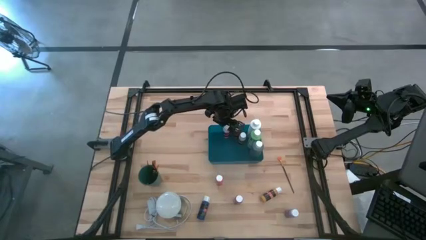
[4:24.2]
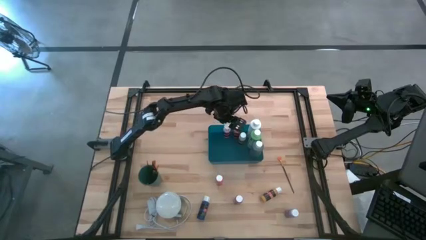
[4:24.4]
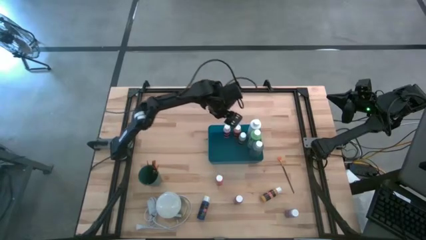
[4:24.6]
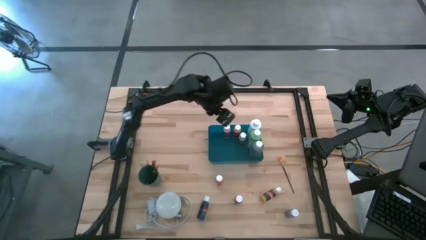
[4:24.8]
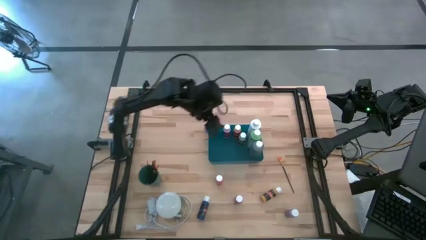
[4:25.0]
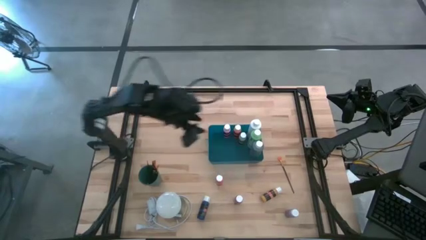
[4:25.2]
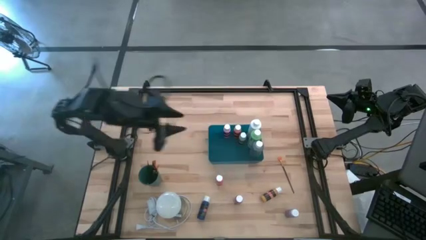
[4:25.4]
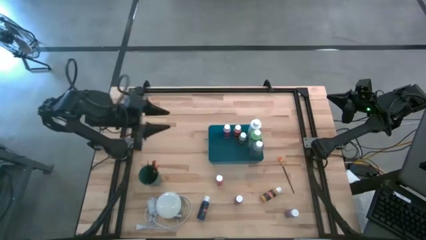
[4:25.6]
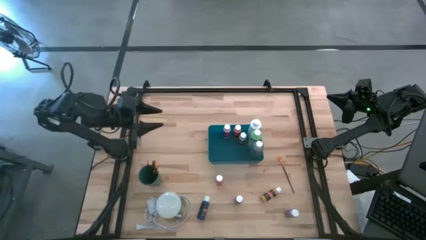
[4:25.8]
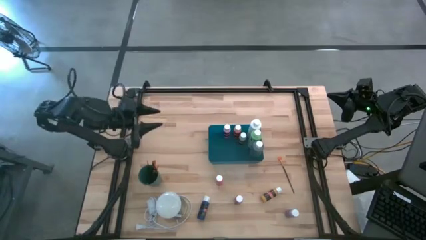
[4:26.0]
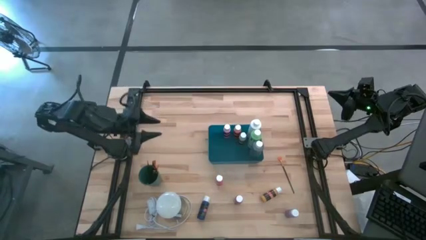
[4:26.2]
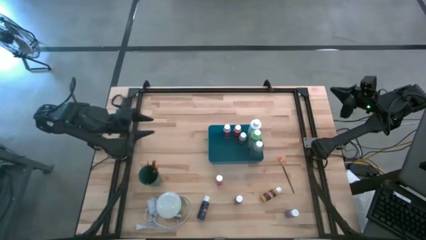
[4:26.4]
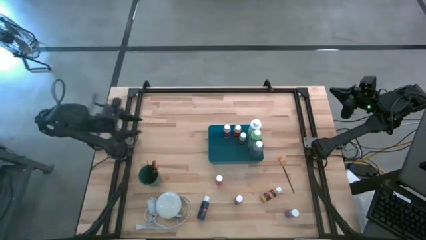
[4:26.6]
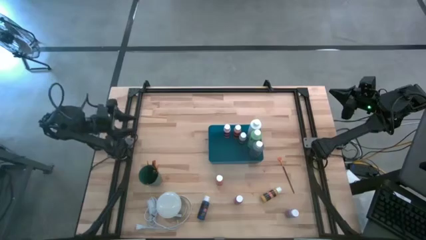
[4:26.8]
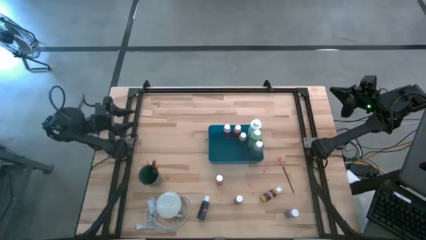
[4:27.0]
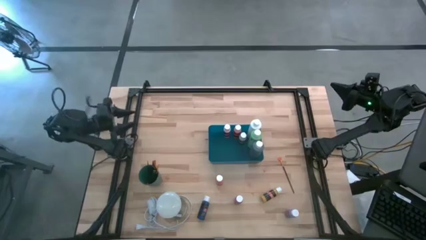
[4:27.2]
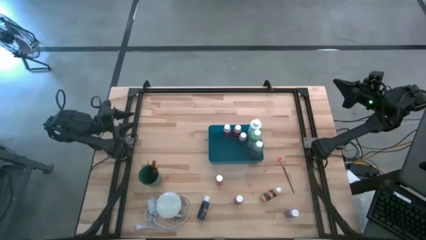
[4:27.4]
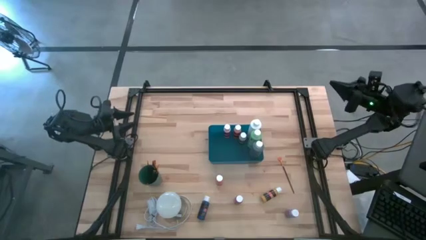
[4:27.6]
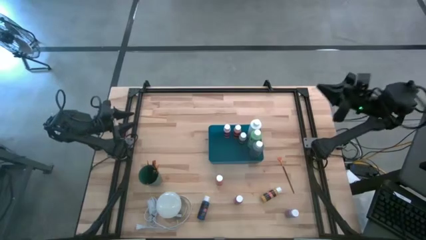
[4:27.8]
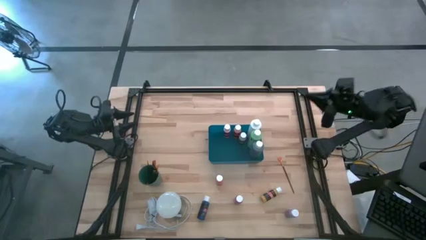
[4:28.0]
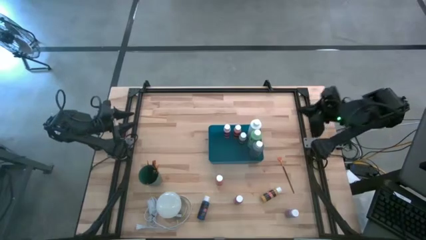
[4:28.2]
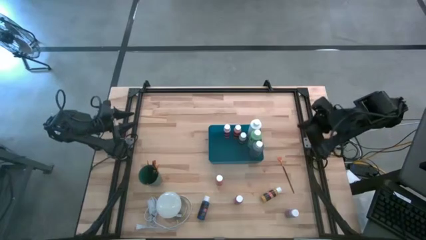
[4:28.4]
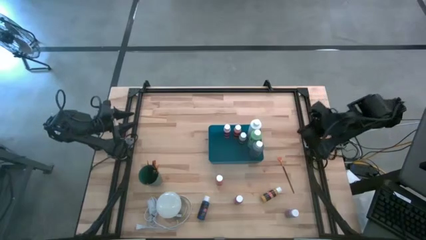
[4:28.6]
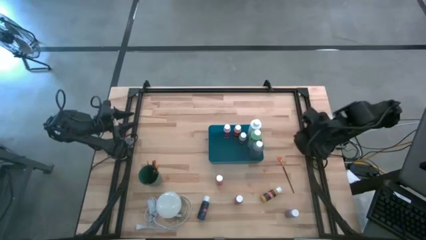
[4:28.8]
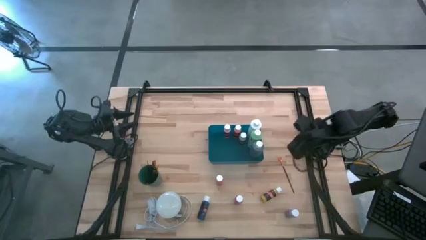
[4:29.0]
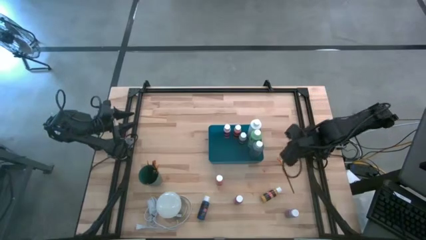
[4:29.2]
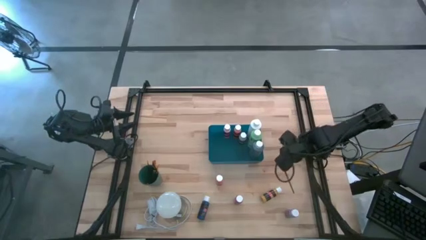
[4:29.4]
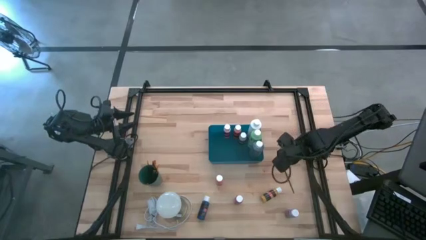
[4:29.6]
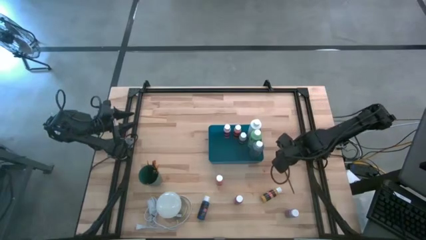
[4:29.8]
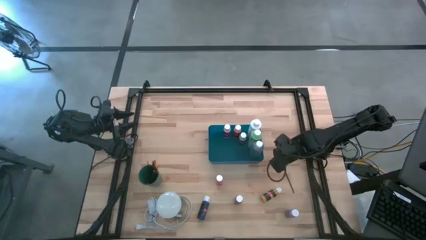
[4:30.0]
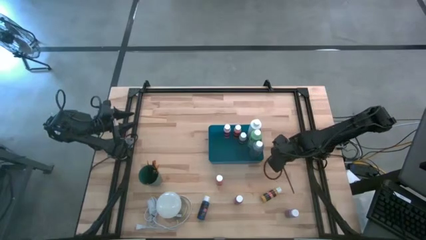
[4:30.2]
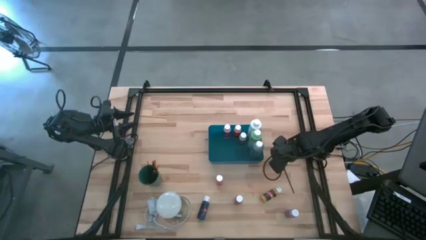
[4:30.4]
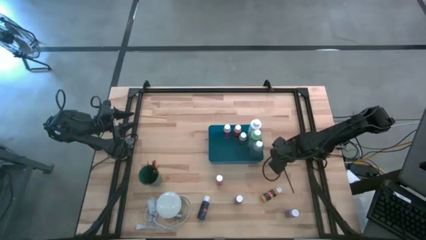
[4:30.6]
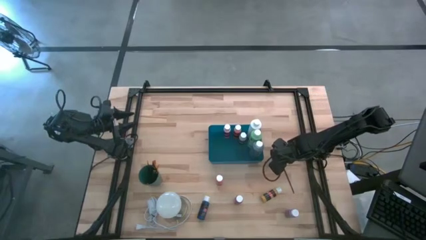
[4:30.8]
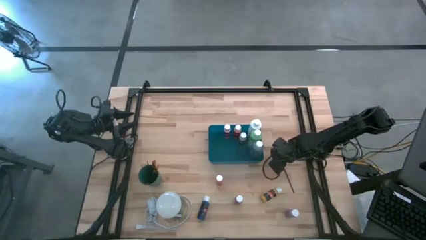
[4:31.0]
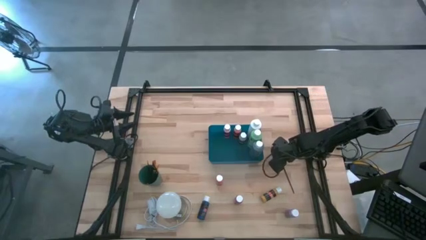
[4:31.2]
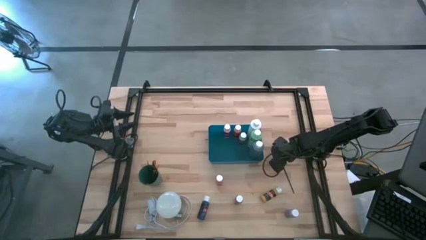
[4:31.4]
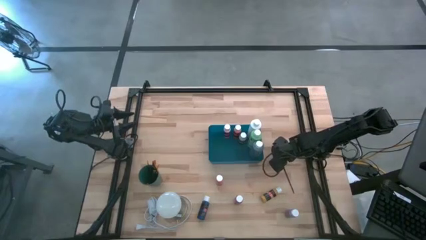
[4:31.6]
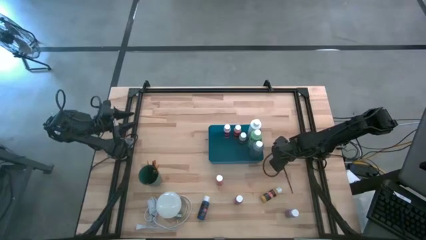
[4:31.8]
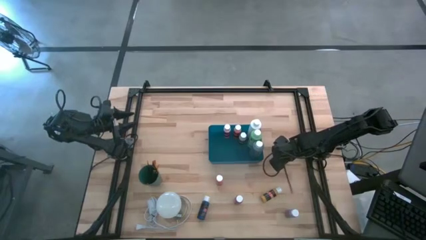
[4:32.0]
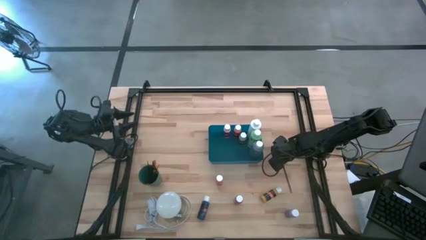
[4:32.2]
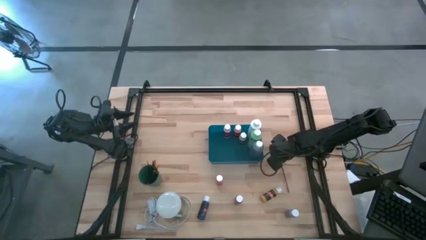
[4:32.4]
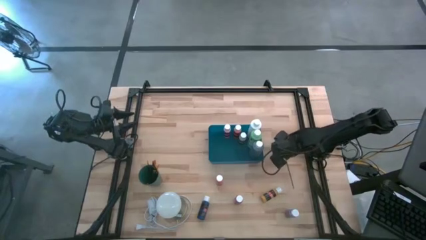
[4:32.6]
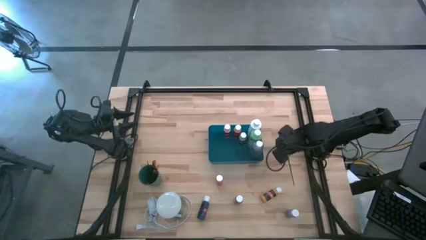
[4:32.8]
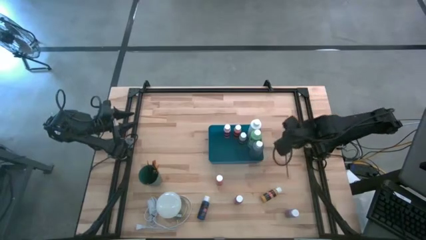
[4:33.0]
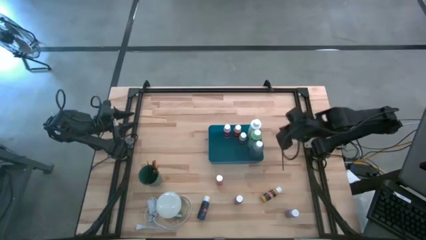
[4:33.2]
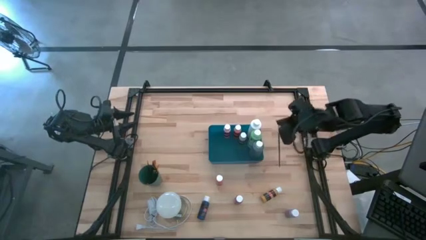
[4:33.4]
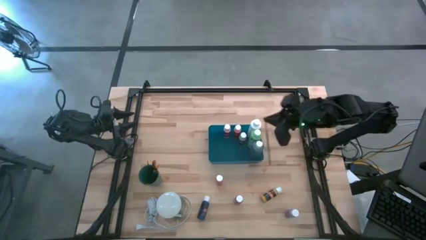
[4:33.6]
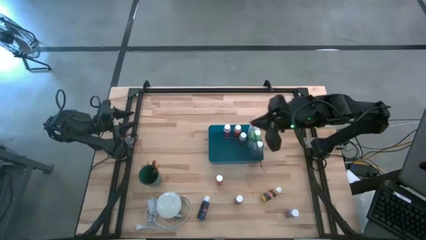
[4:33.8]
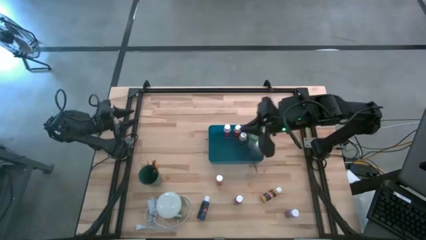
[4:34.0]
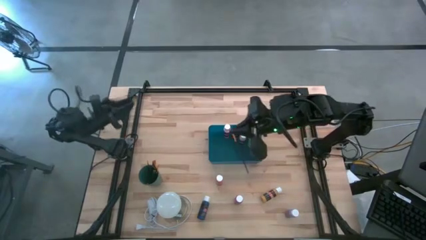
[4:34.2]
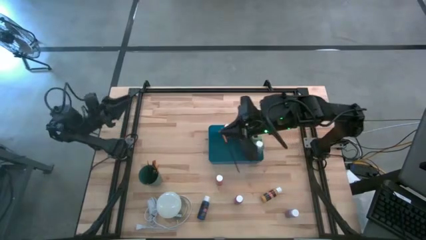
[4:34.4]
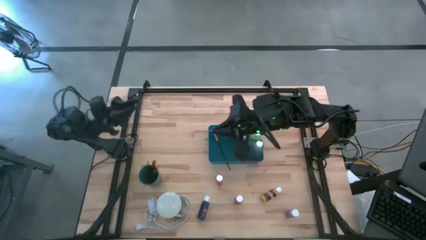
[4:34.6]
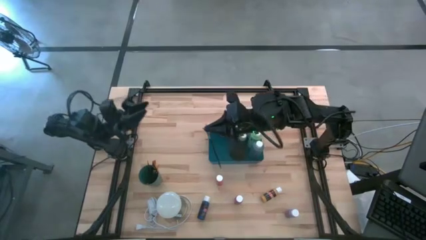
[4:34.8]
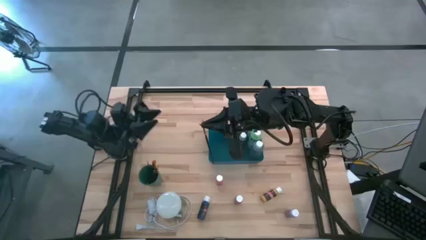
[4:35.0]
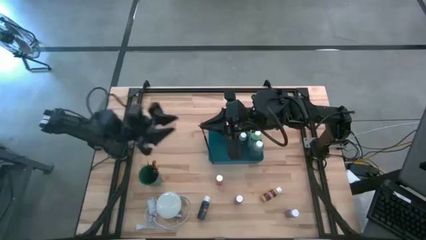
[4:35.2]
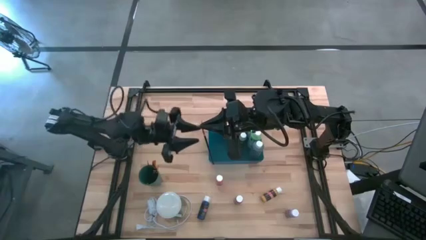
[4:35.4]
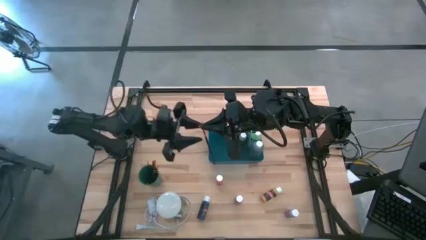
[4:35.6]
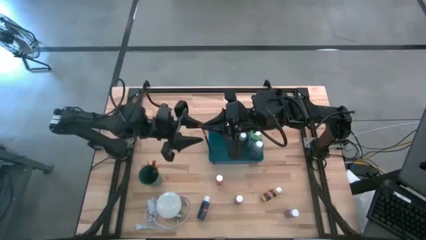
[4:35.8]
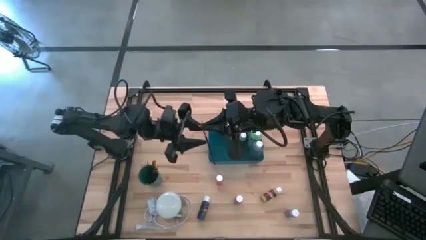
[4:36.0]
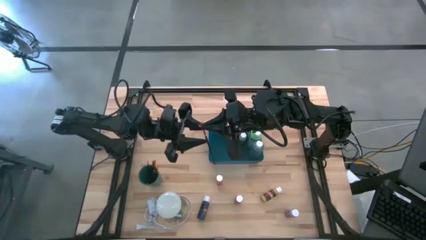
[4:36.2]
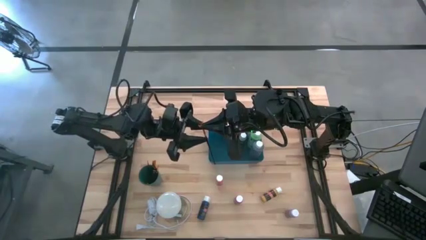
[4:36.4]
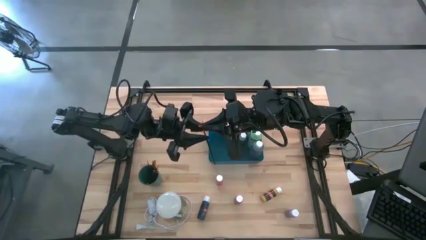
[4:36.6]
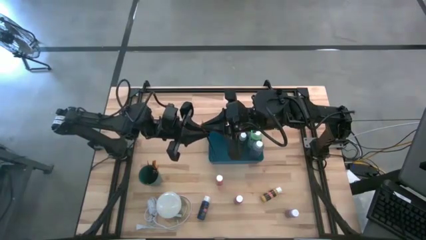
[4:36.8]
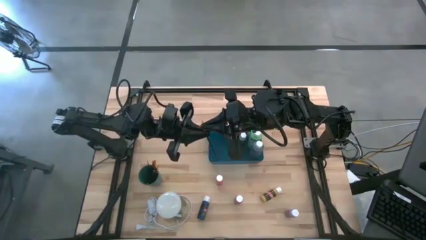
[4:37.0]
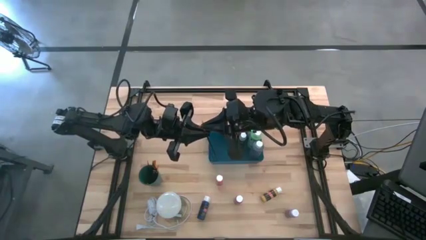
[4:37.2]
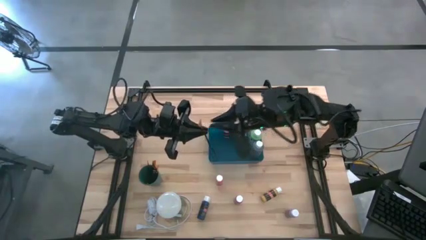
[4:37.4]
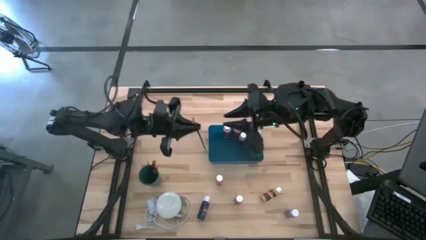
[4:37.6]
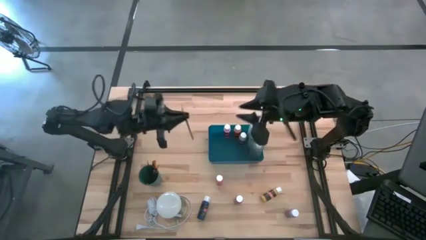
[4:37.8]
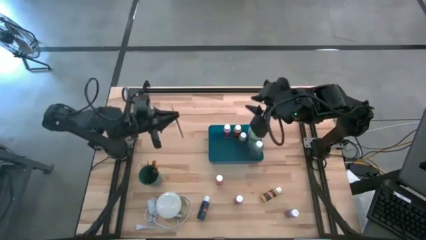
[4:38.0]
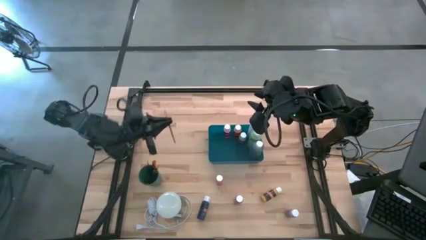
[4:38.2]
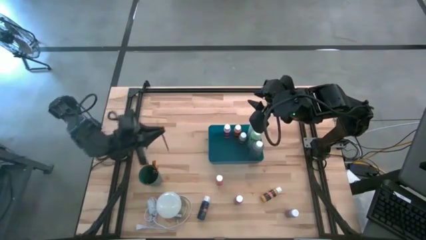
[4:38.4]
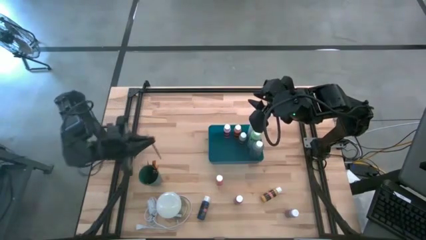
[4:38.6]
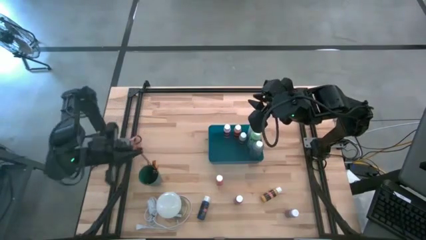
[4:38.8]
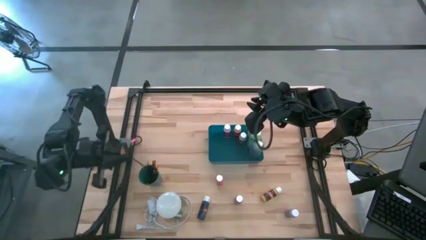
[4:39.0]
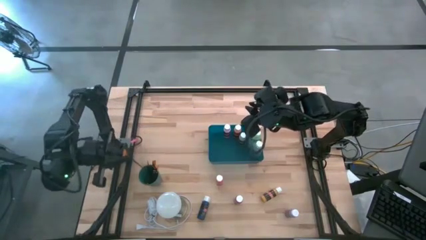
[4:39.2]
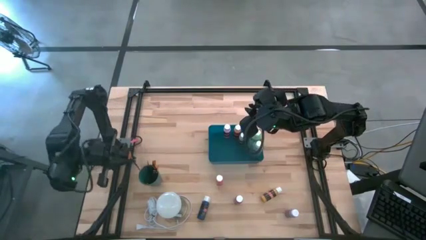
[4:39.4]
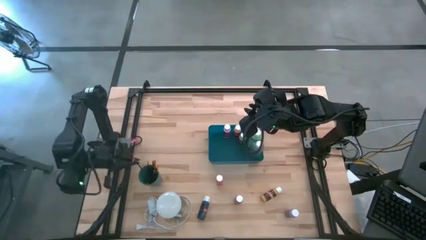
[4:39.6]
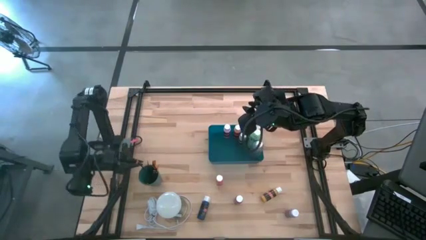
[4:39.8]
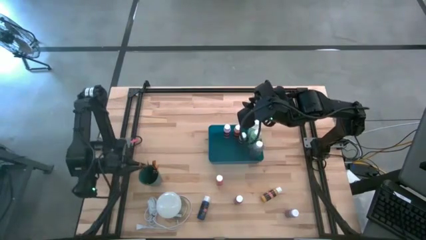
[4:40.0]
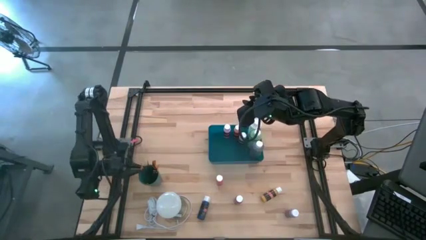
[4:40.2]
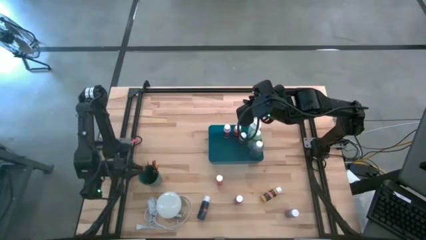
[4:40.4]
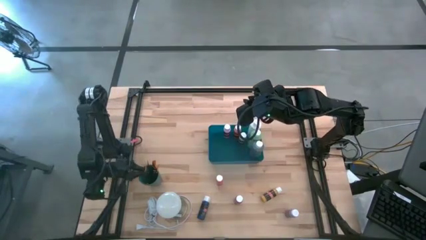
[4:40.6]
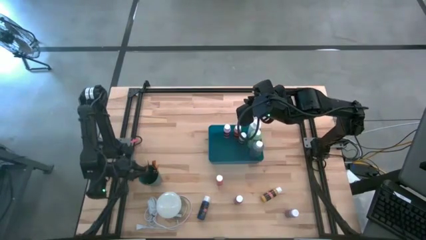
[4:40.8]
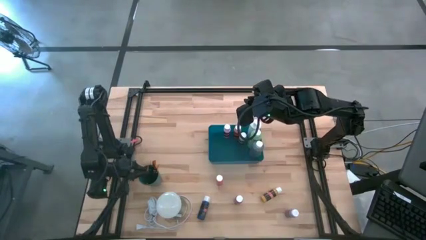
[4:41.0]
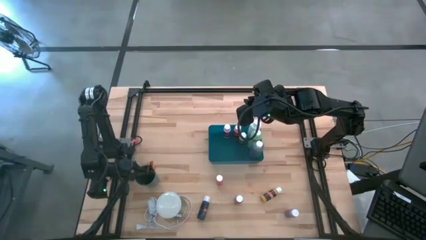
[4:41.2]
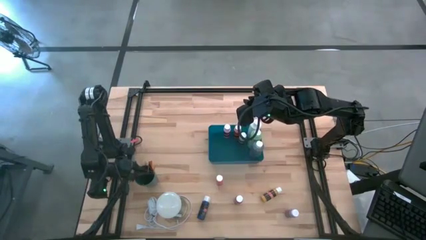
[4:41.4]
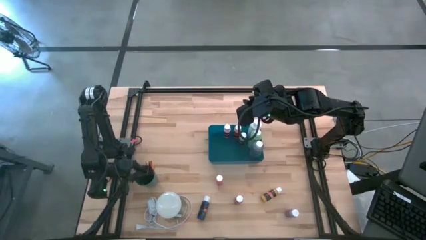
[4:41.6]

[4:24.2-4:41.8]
Task: Pick & Place Paint Supplies
Put the gold paintbrush into the green cup
